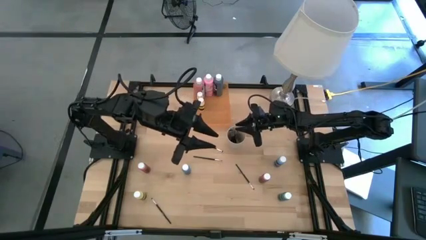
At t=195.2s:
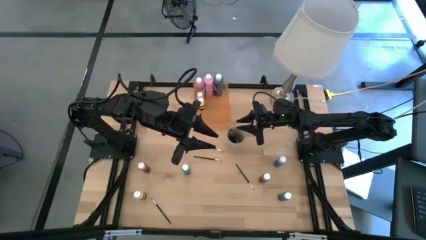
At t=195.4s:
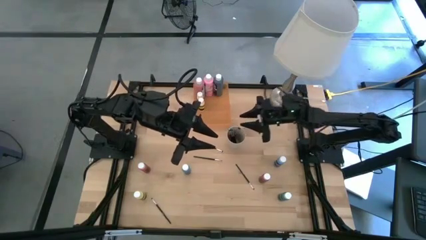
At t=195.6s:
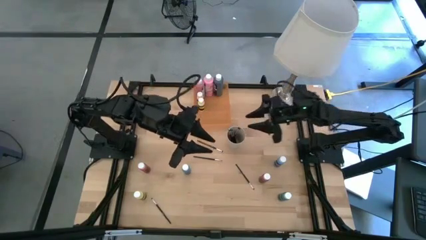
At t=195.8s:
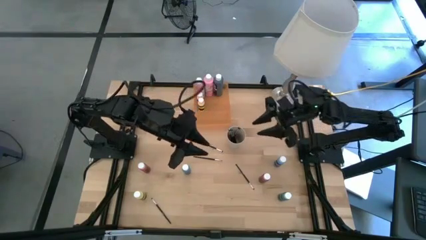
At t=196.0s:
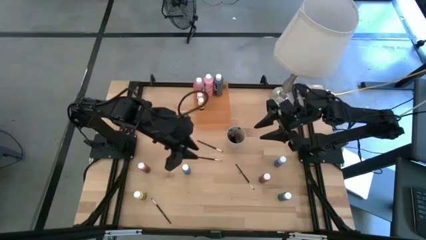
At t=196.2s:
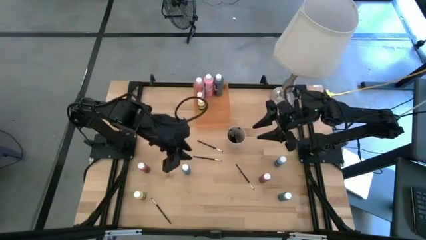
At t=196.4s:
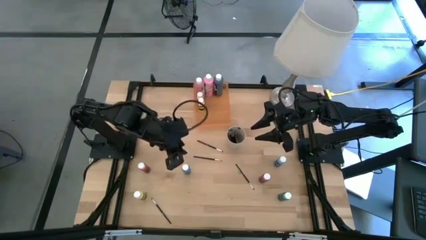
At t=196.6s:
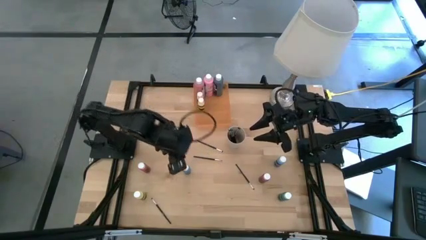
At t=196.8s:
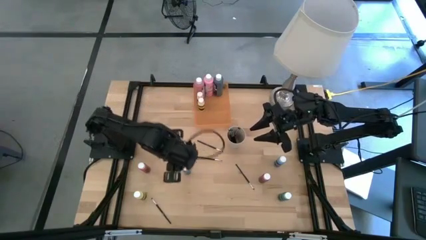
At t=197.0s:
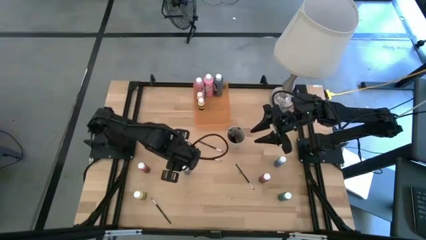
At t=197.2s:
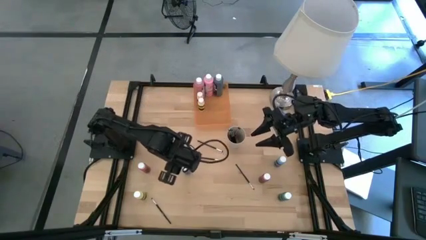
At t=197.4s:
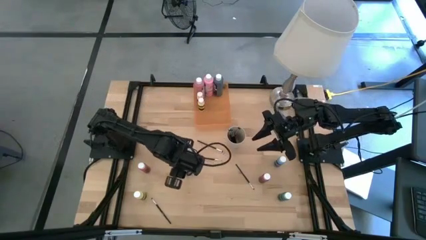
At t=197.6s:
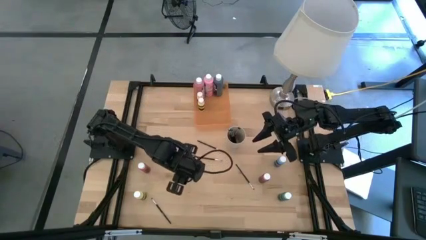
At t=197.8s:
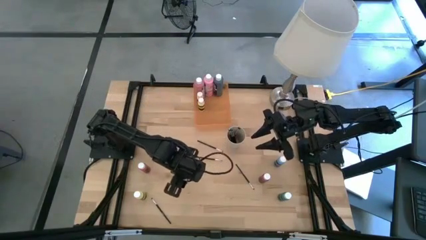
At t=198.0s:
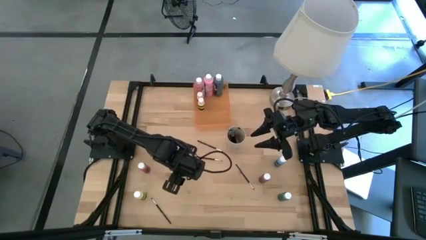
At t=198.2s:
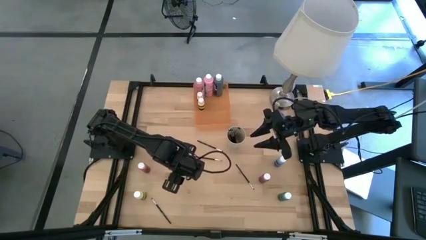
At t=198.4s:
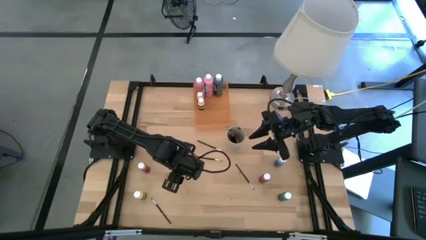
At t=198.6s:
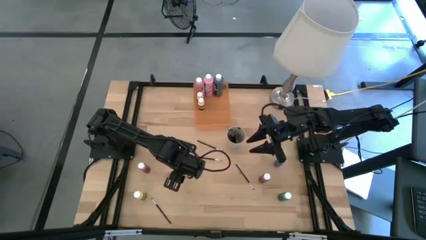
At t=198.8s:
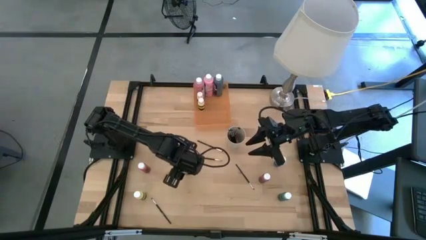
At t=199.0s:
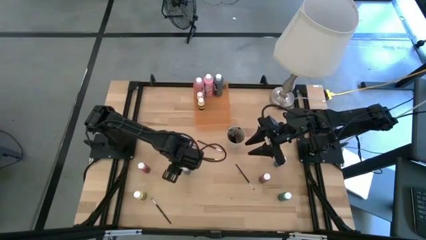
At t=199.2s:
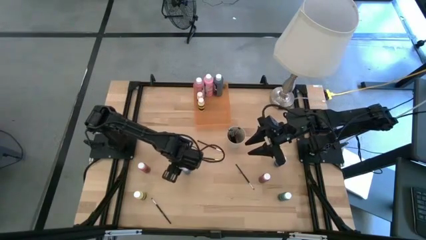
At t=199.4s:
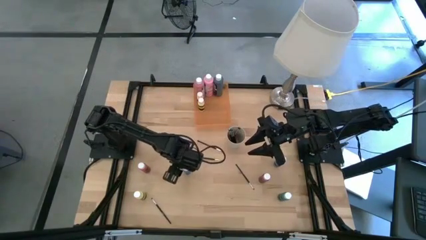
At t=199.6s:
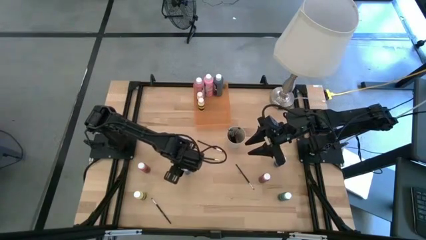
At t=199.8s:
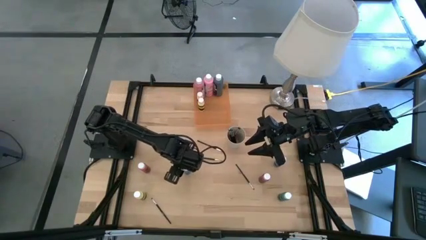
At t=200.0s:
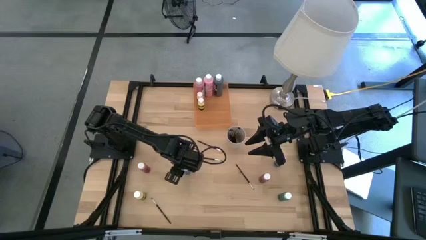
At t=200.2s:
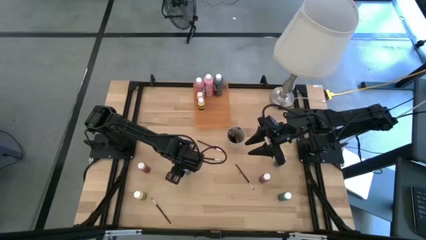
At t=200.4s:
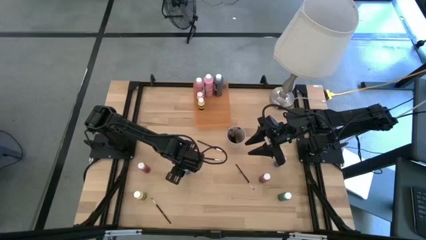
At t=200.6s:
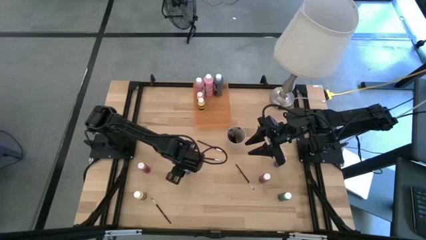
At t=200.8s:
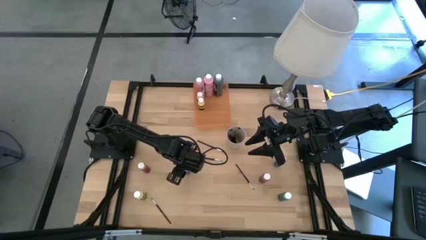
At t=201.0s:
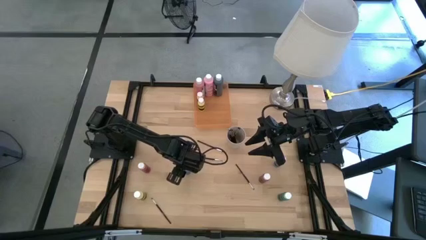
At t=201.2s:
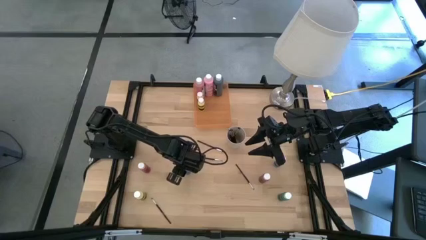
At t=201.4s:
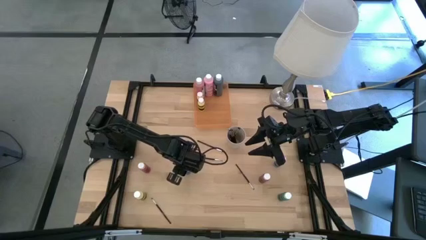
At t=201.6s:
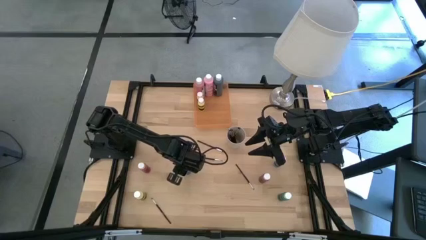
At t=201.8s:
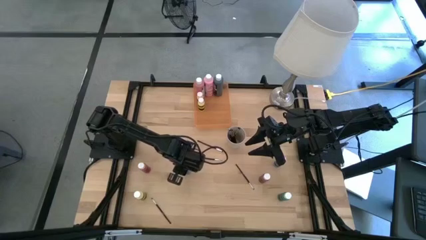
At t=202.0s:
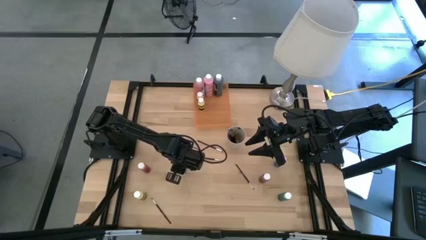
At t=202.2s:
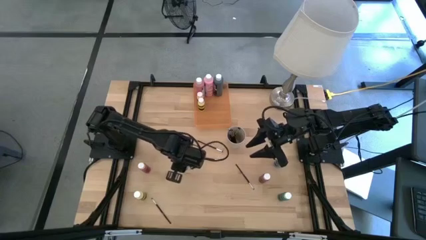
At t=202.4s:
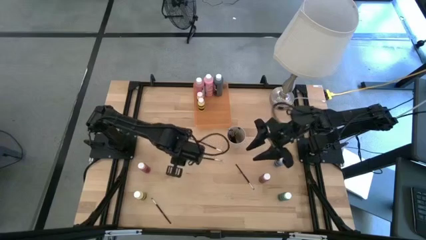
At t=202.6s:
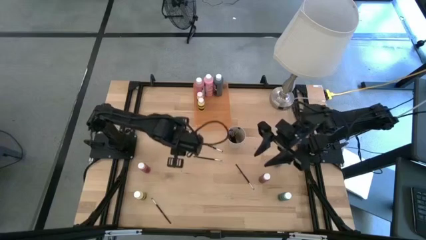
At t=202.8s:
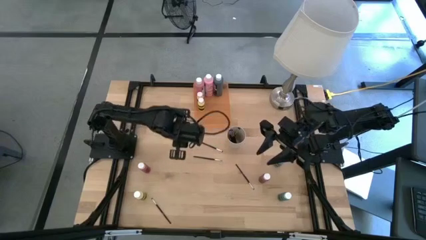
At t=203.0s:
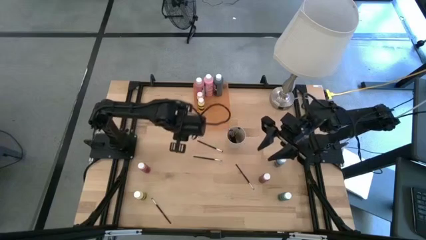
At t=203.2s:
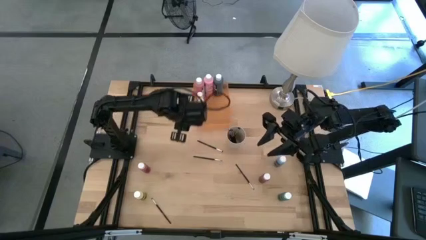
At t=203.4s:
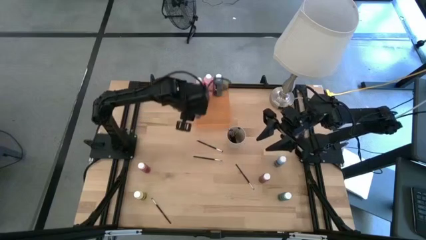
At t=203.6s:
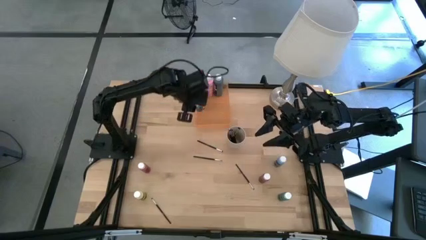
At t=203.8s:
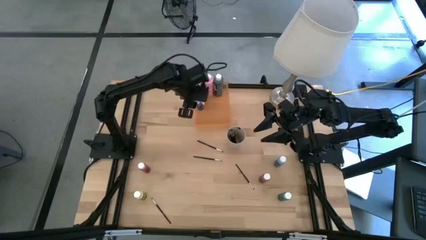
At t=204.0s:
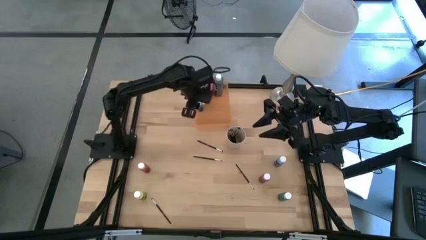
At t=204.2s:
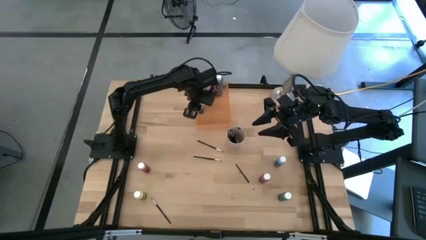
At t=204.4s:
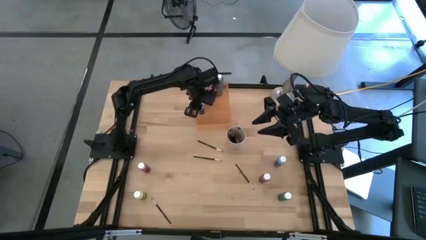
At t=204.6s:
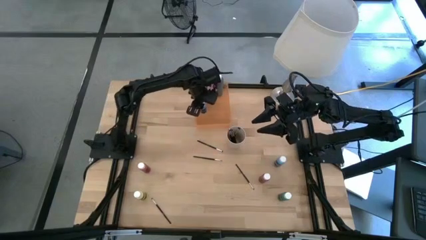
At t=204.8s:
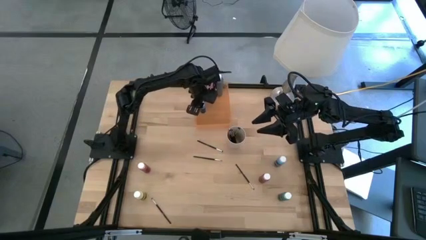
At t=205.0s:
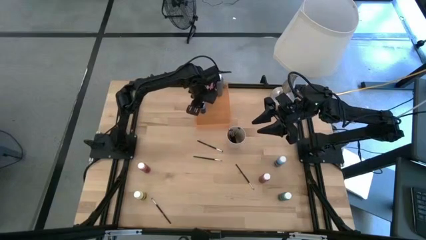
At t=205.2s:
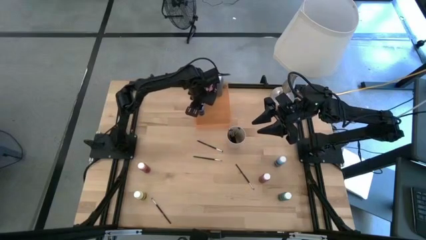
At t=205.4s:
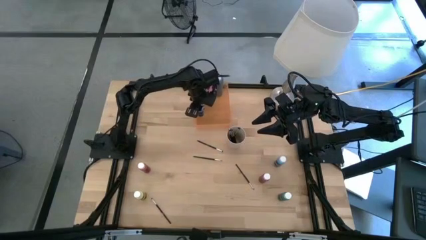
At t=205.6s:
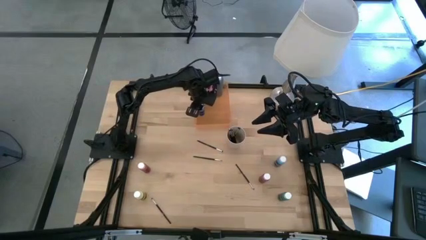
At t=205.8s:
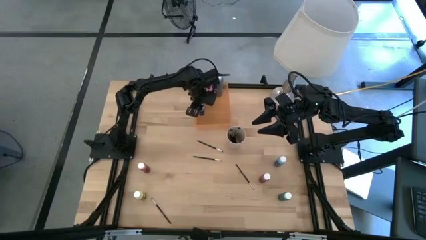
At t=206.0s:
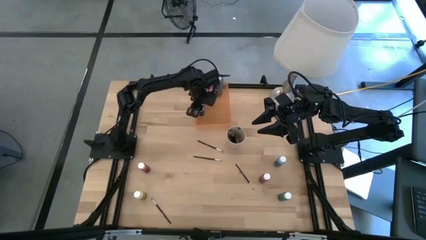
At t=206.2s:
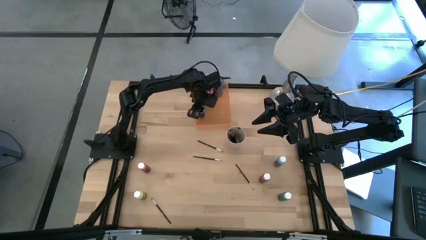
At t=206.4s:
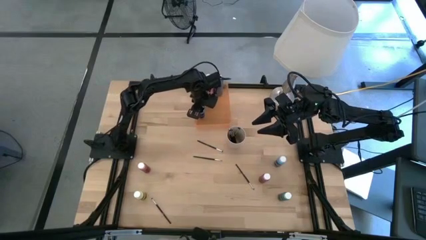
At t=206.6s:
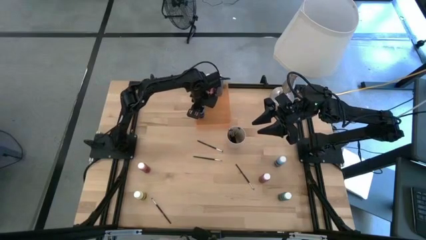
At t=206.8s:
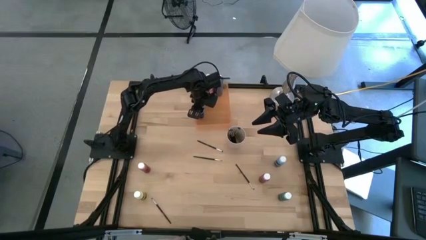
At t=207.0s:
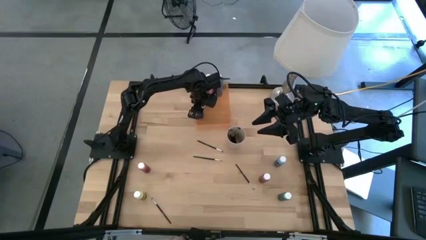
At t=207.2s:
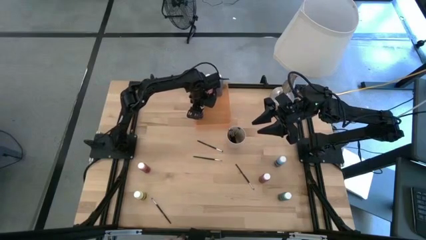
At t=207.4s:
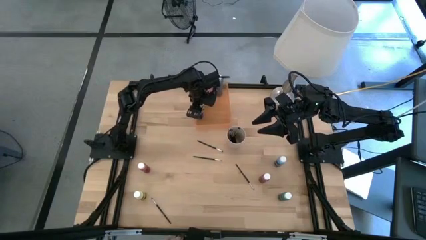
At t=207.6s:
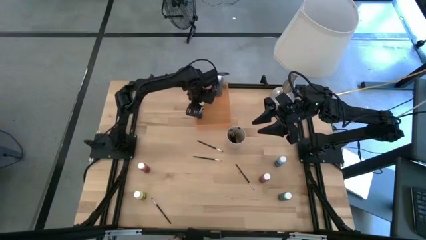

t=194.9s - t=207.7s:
Task: Pick & Place Paint Supplies
Put the blue paint bottle into the orange bin

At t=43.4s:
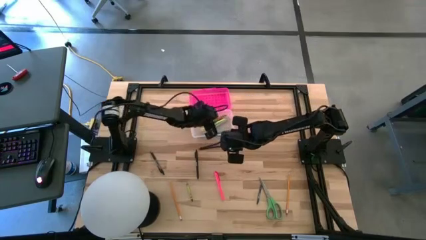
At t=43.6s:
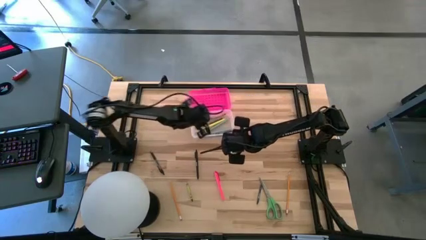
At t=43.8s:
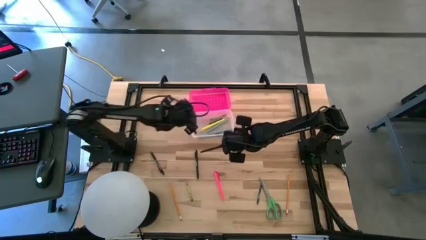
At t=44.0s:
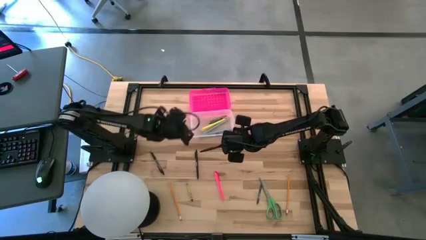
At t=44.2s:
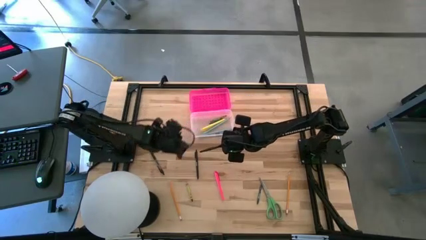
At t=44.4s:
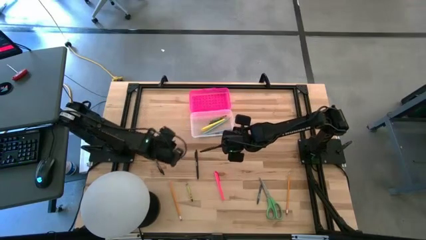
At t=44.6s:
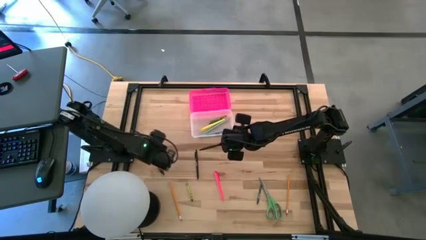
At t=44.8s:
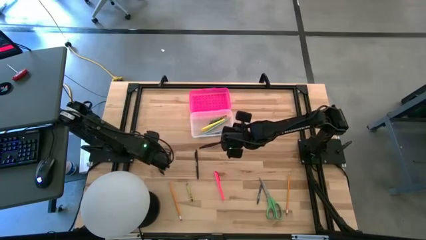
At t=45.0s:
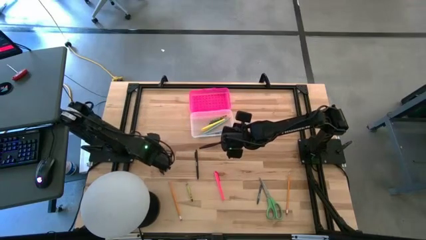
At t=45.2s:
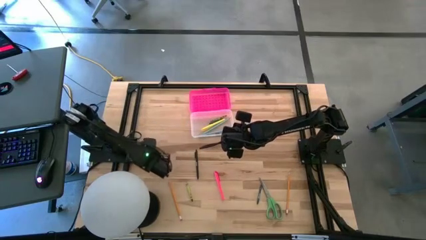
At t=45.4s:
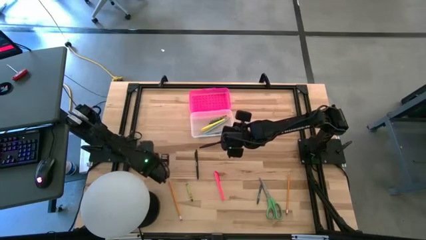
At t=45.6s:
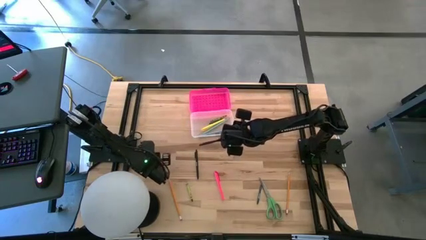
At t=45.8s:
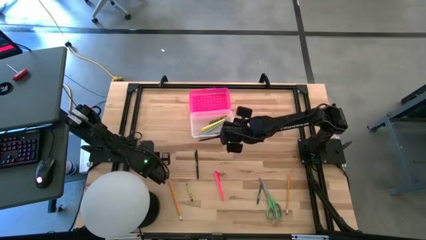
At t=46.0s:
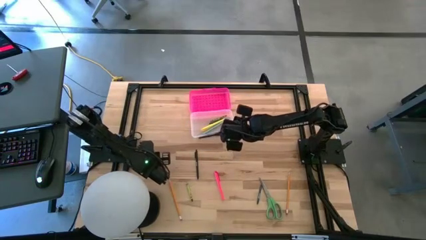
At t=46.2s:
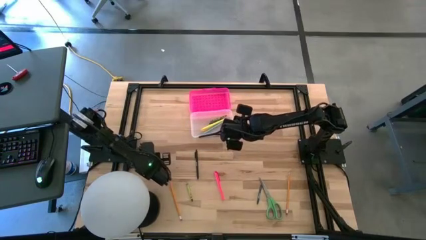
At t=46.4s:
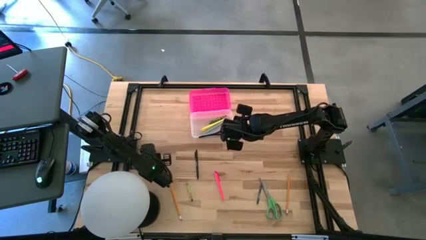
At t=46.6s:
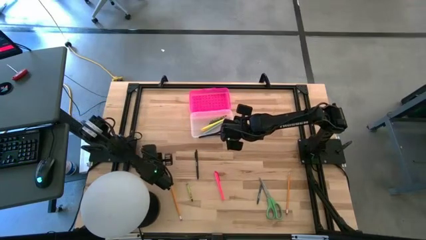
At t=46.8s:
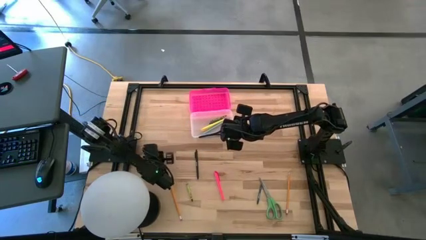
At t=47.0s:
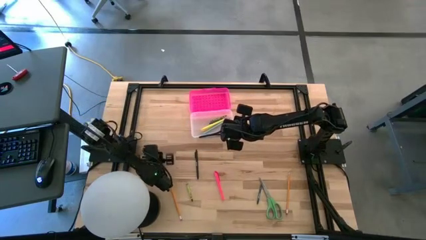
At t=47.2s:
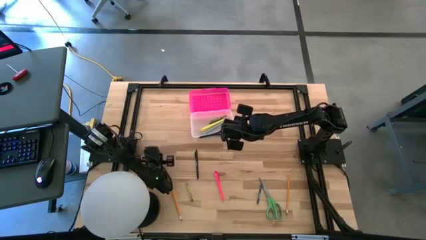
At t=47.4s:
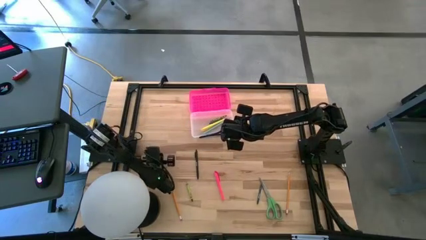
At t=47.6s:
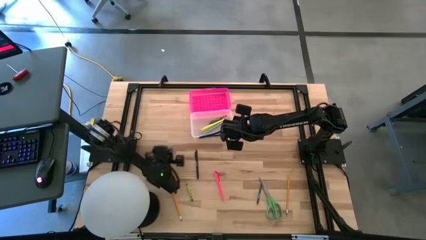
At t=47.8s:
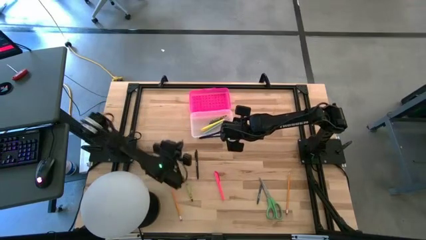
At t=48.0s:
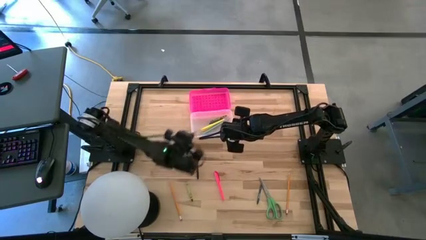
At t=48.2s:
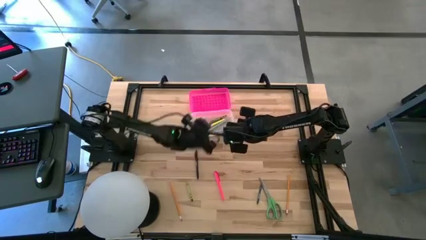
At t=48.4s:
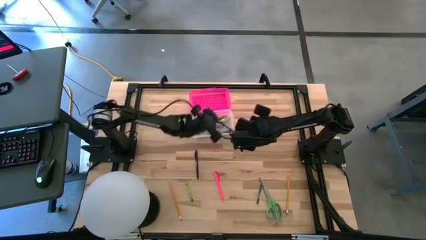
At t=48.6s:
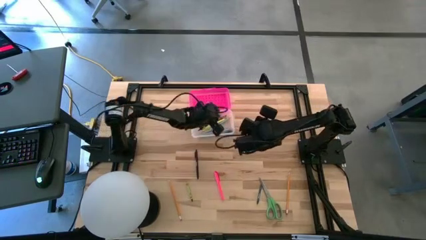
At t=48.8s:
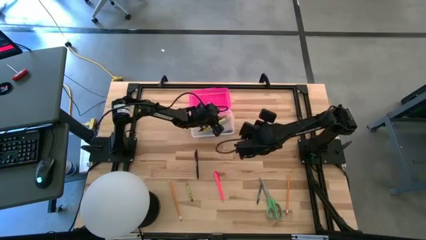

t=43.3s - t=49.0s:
Task: Pick & place school supplies into a supply box
Put the black pen into the pink supply box
